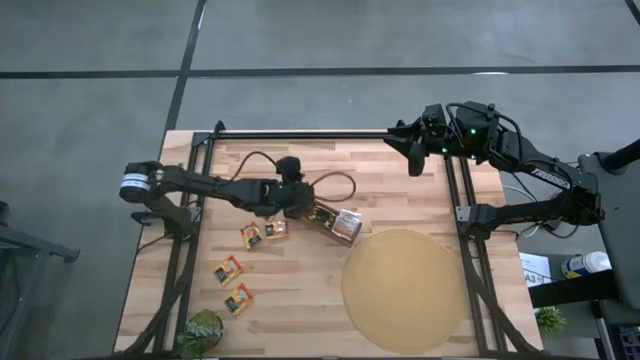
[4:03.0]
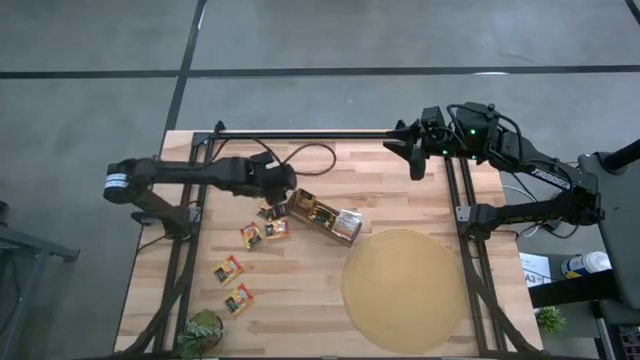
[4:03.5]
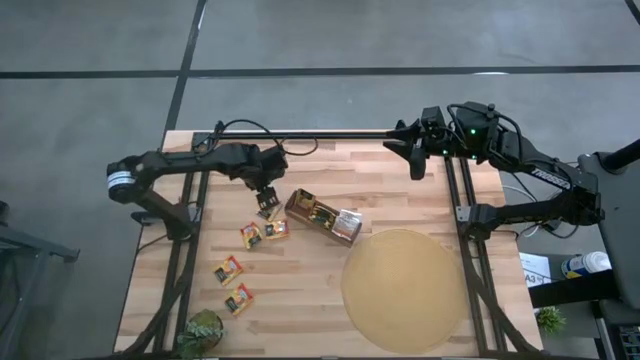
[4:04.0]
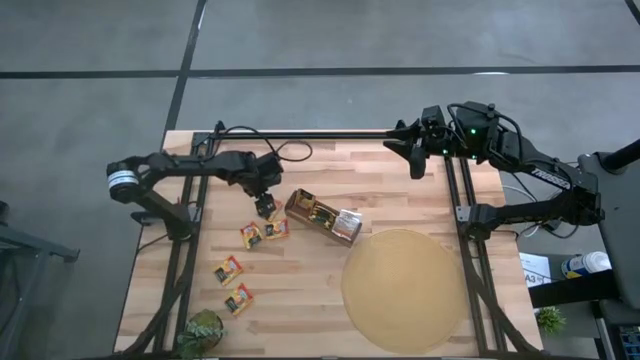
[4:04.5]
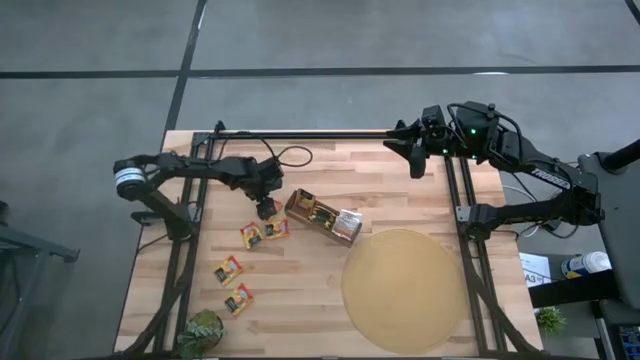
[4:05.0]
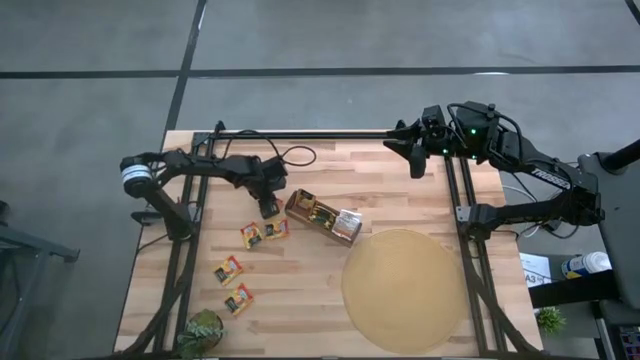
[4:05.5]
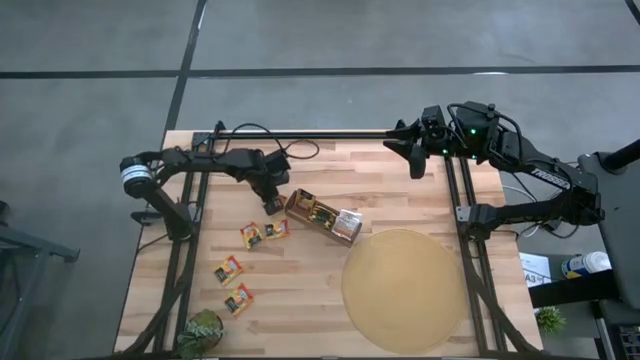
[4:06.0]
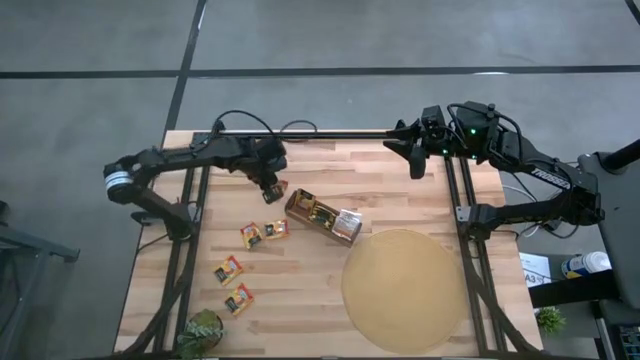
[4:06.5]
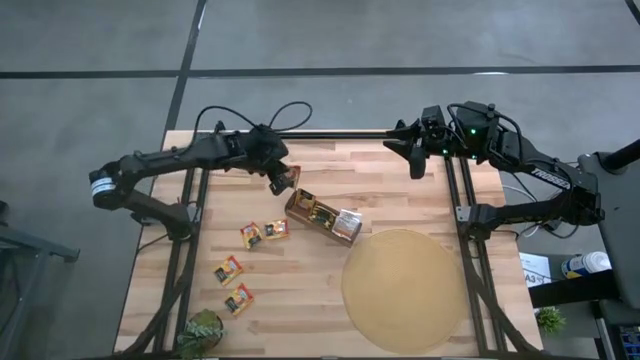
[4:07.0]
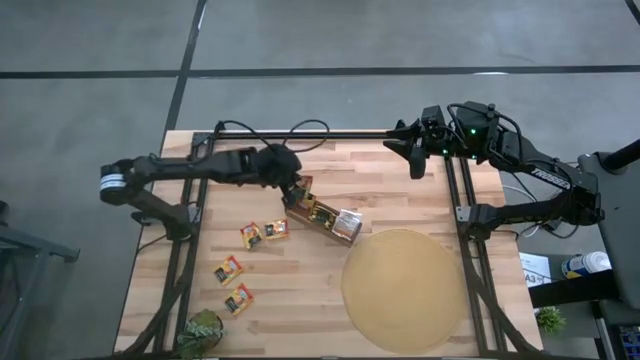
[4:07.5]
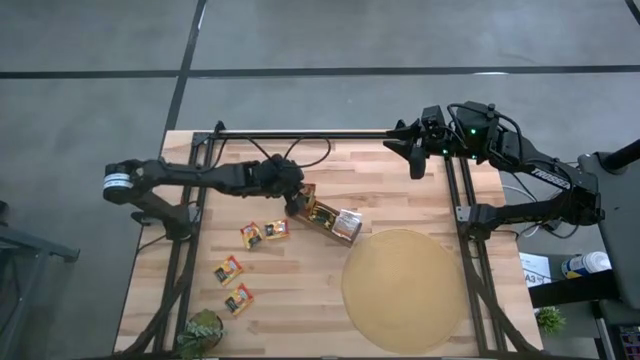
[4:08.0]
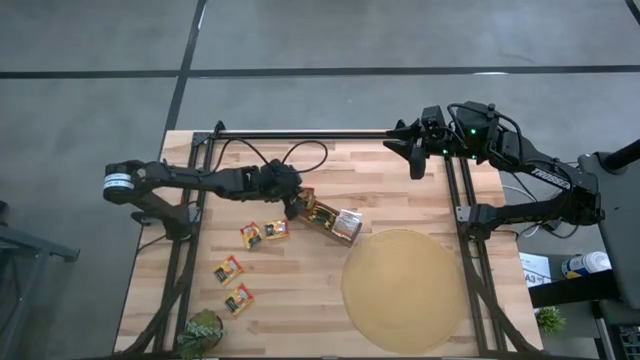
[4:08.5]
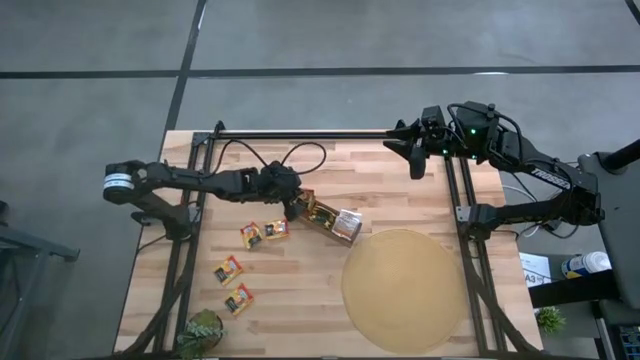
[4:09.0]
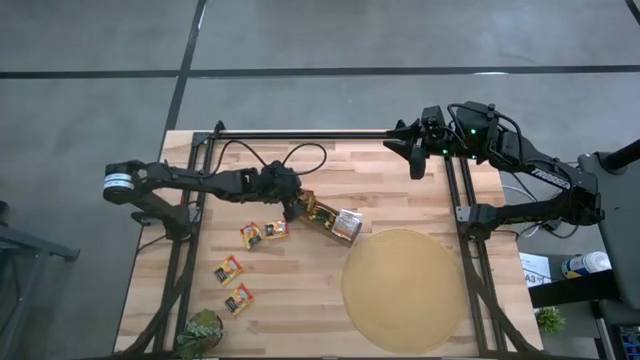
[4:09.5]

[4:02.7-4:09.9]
Task: Pick & Place Tea
Put the orange tea bag into the left section of the wooden organizer

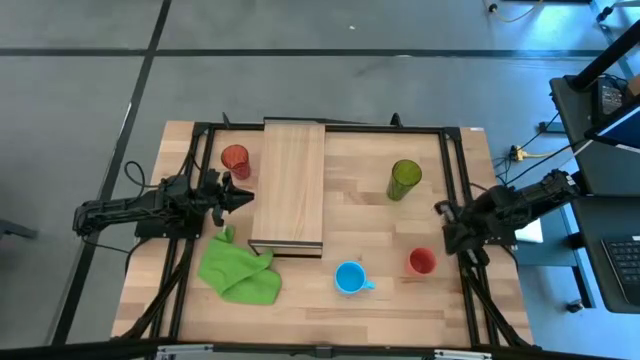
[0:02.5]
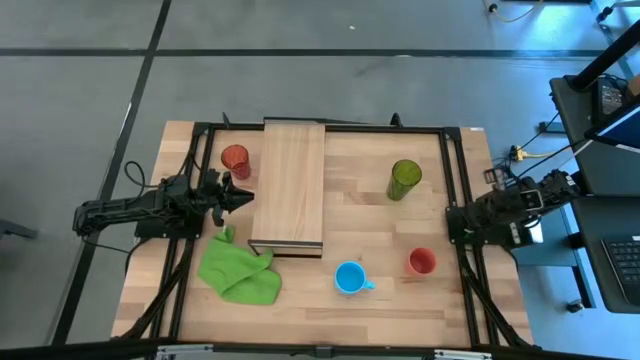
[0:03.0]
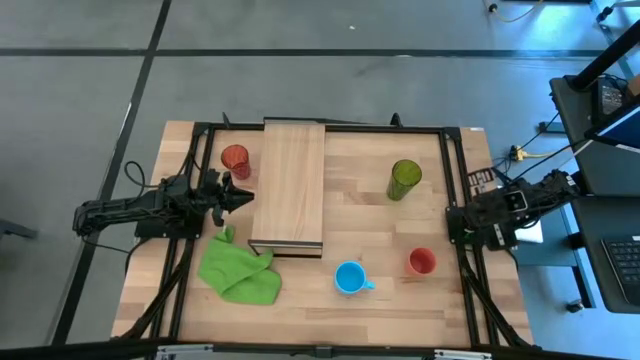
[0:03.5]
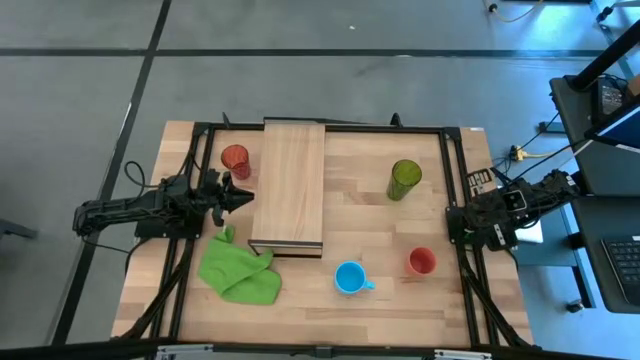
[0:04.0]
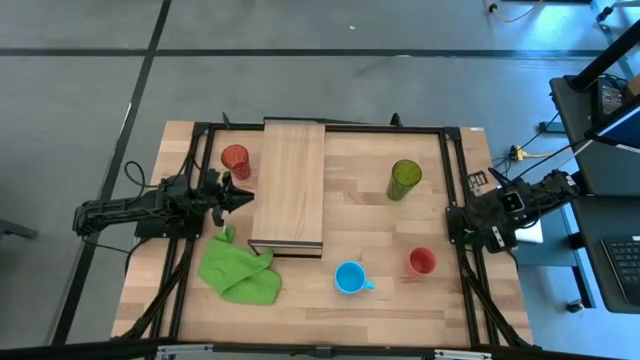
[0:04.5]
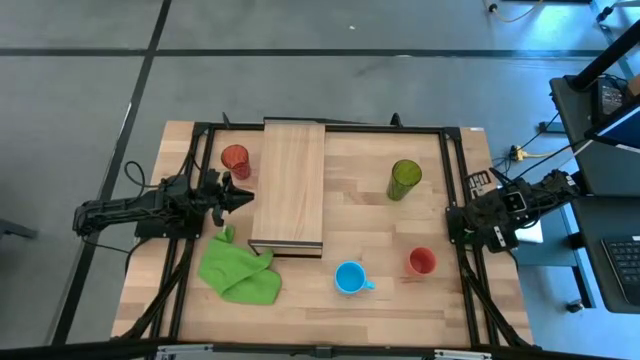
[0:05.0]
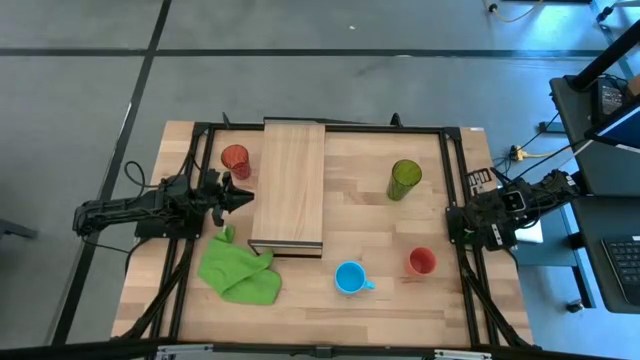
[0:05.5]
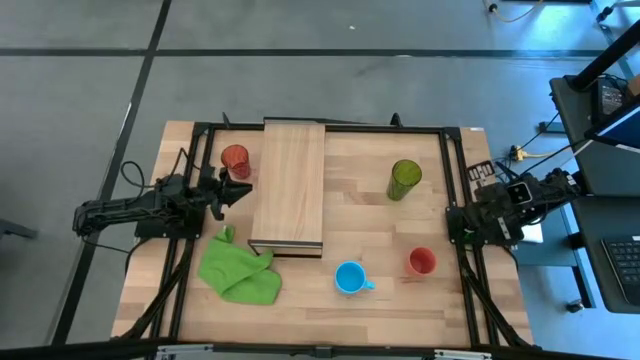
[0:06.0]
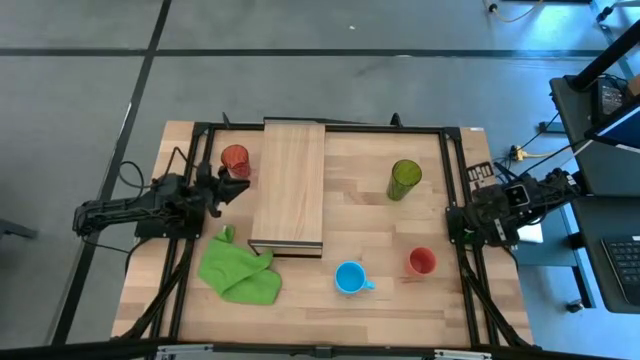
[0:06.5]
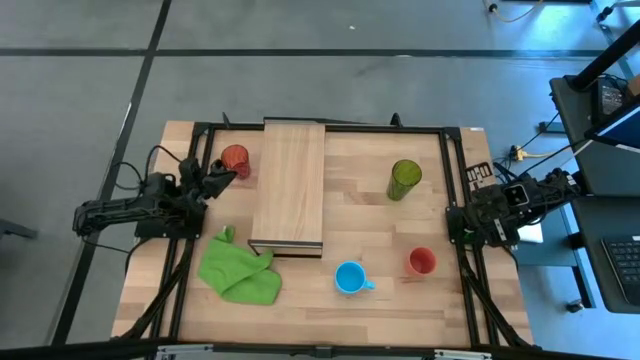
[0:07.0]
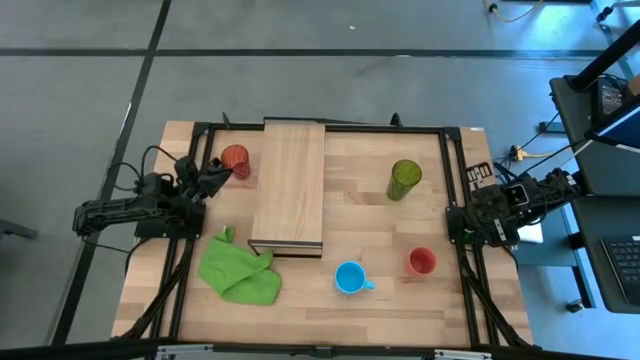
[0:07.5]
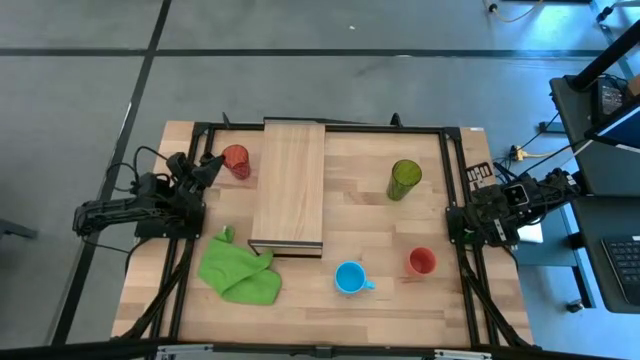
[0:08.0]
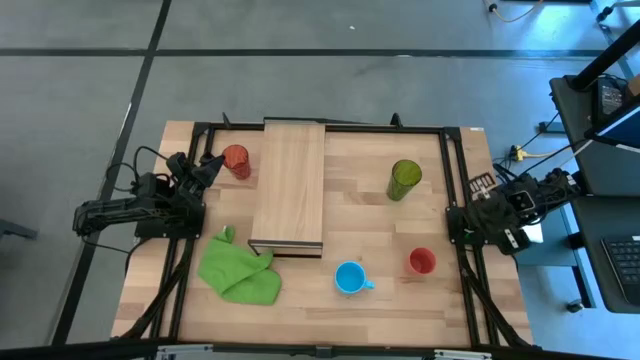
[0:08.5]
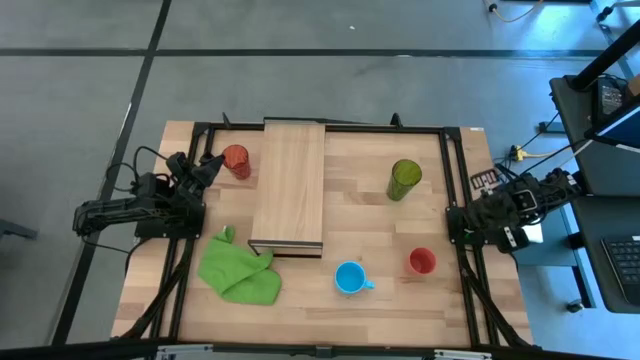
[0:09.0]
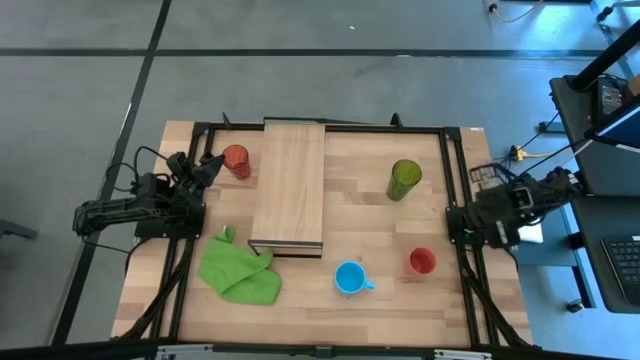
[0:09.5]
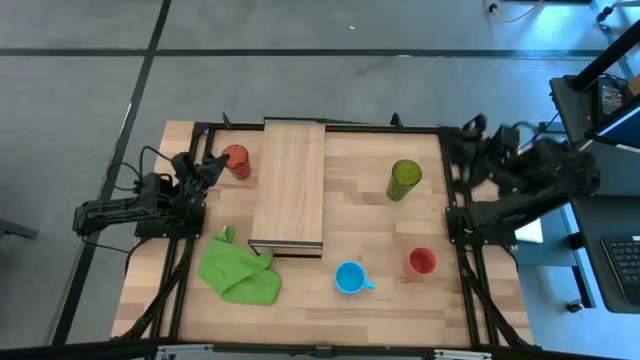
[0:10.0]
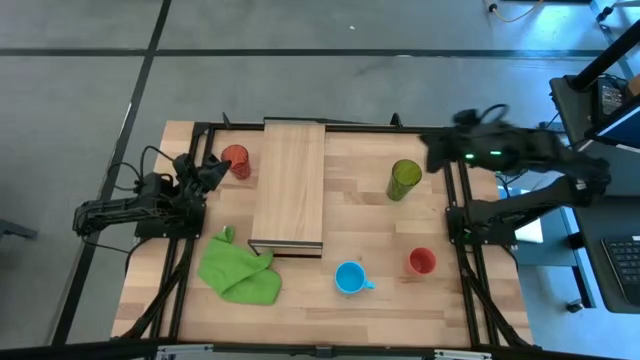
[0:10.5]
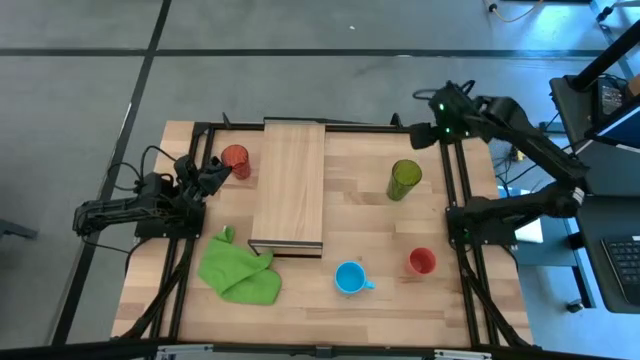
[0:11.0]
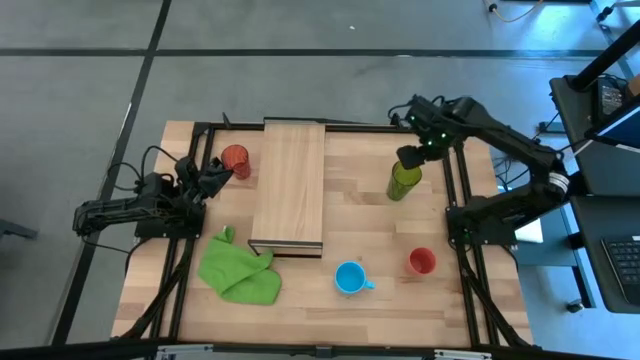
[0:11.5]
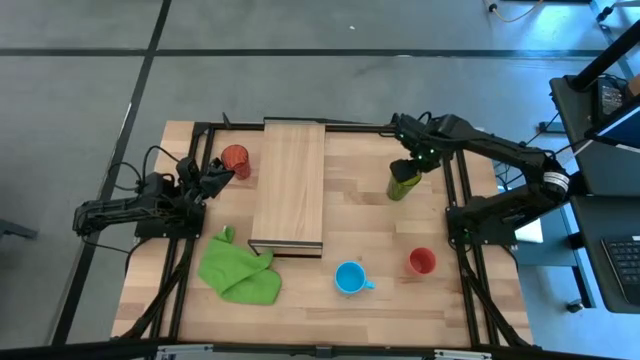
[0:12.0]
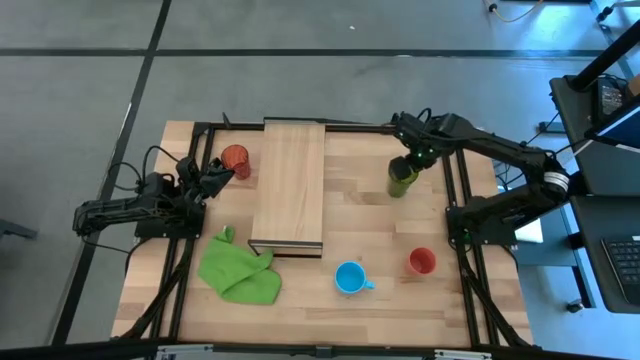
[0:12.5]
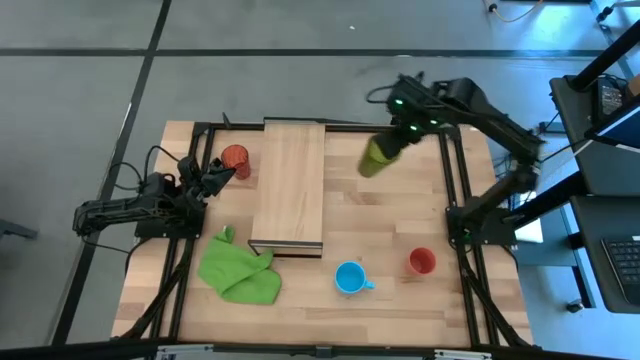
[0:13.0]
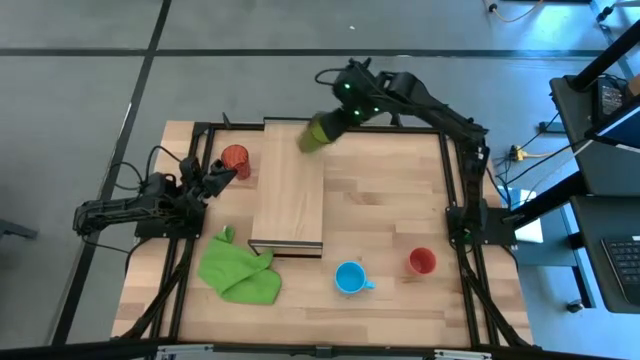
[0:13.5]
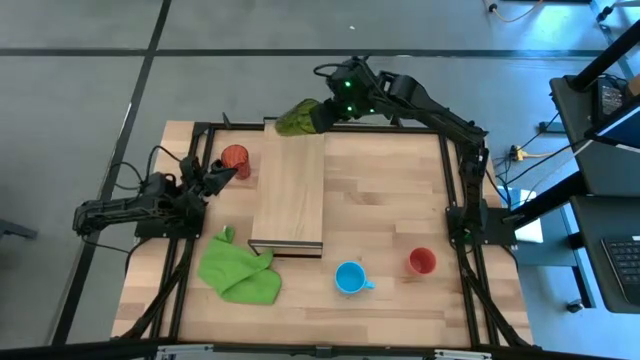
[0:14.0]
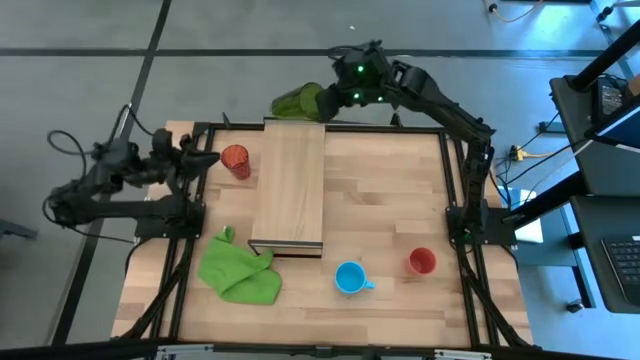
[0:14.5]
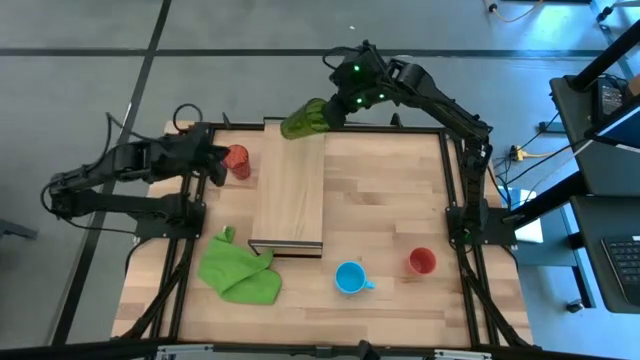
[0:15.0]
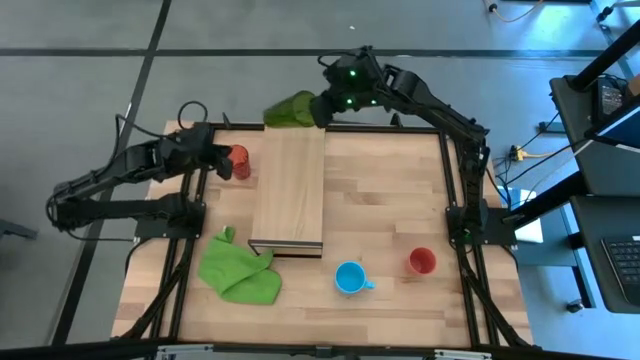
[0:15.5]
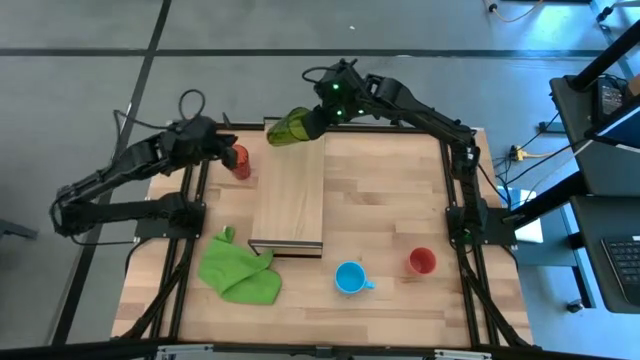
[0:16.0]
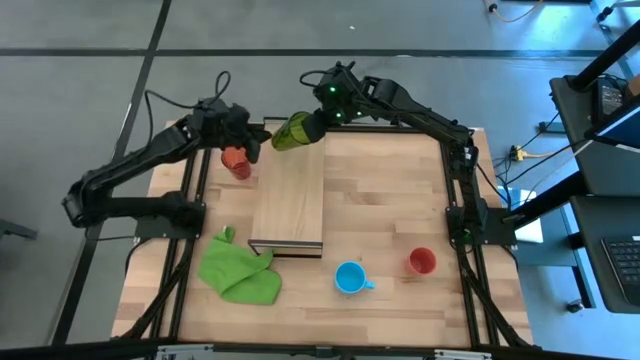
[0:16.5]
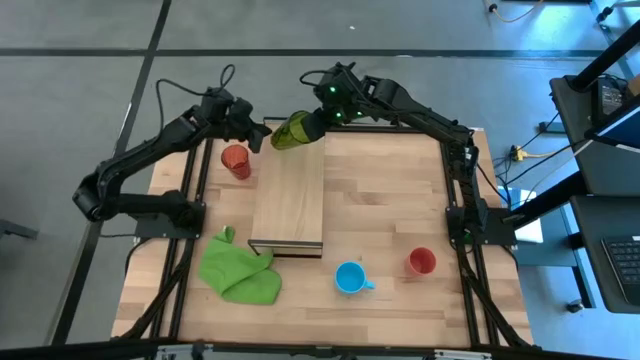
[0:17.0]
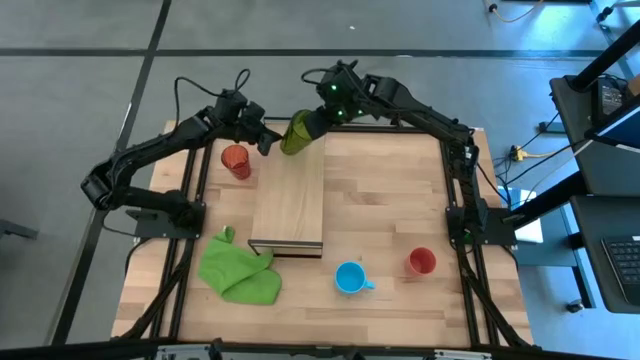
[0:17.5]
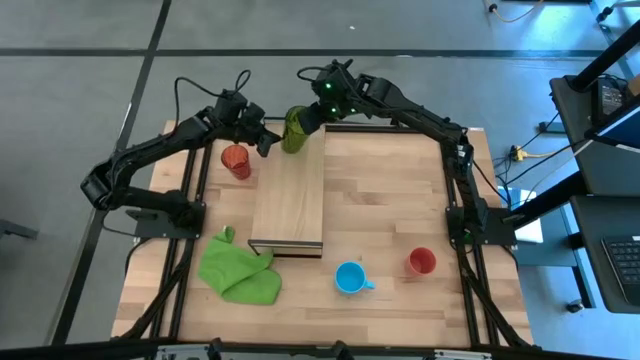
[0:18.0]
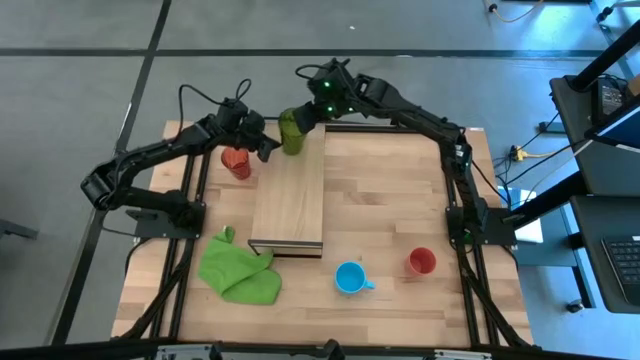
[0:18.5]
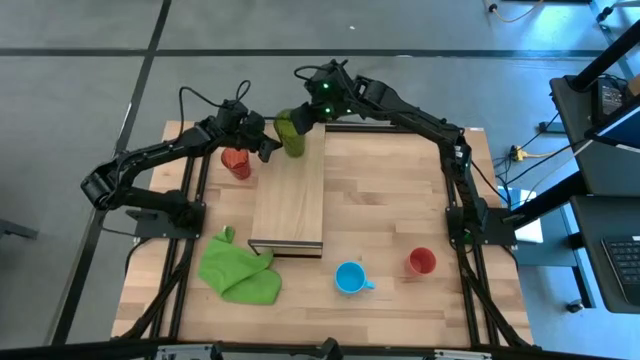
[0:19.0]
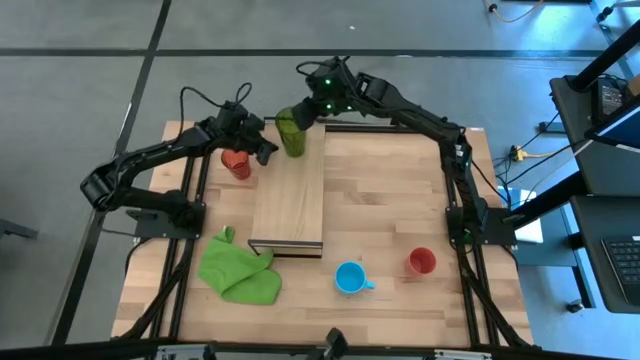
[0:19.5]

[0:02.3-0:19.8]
Task: Stack small to large cups/mugs on shelf
Put the green cup on the shelf
